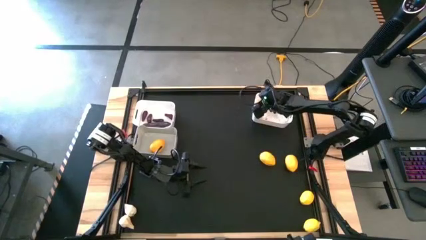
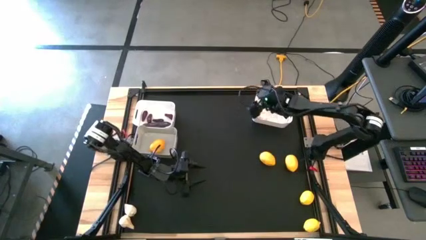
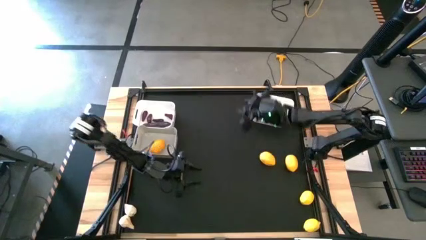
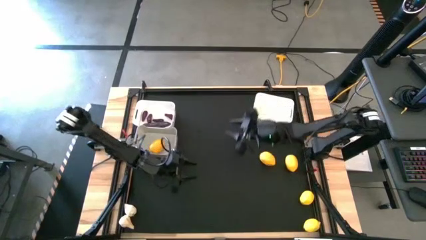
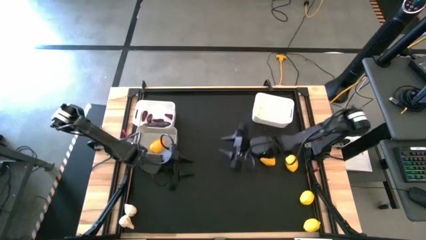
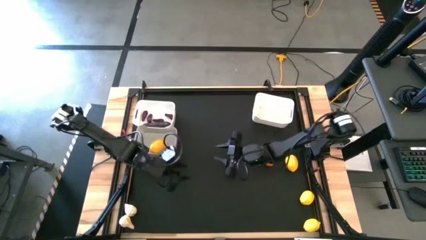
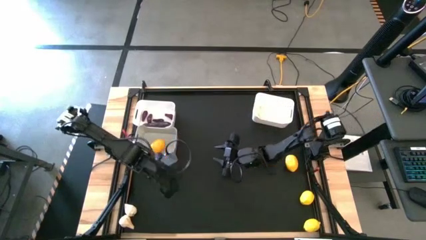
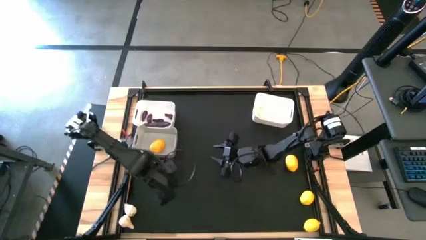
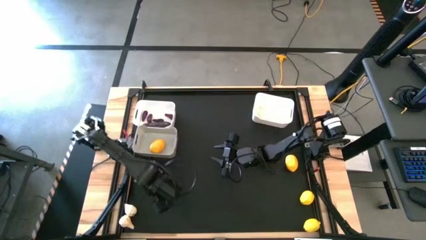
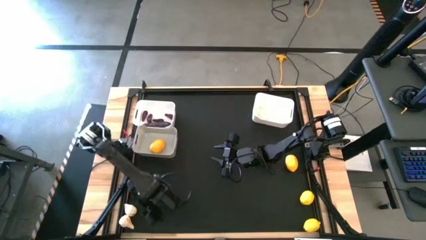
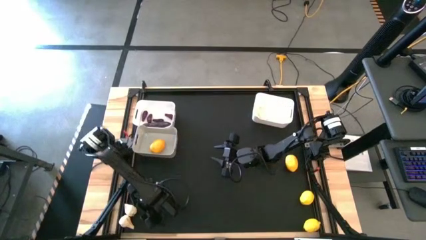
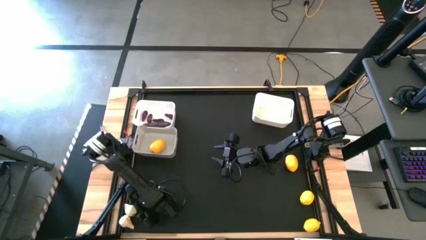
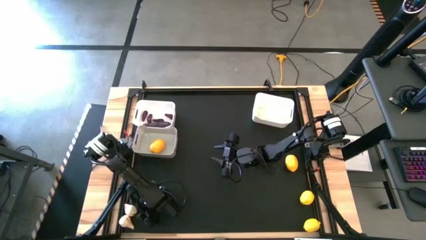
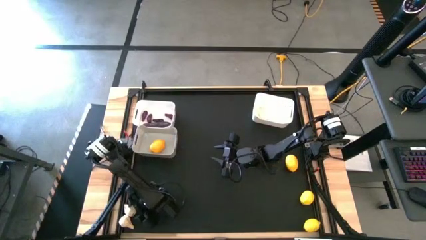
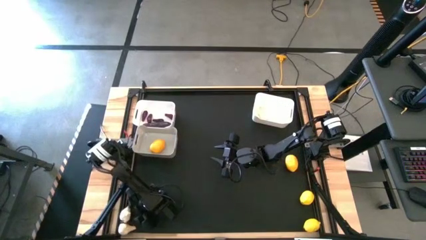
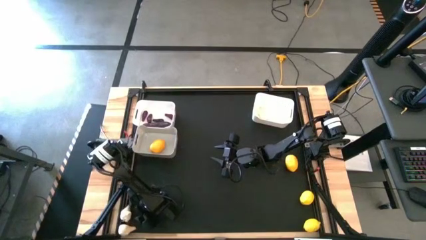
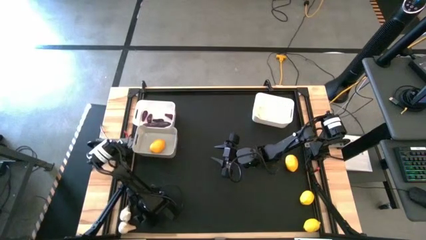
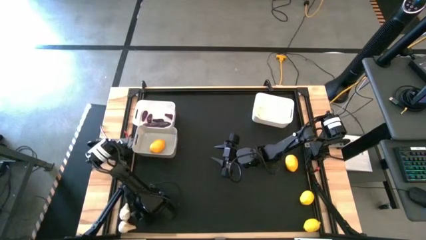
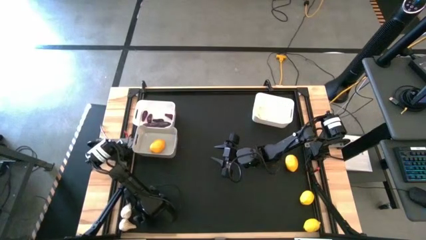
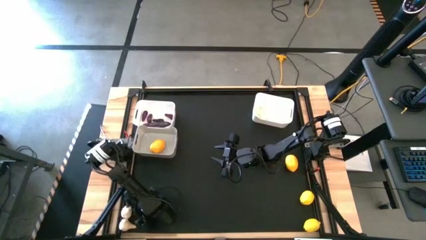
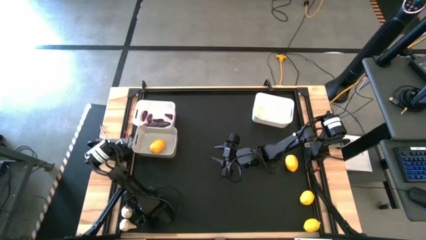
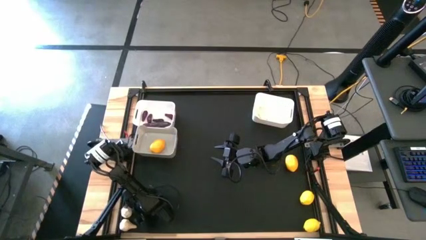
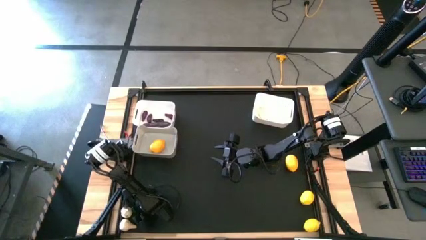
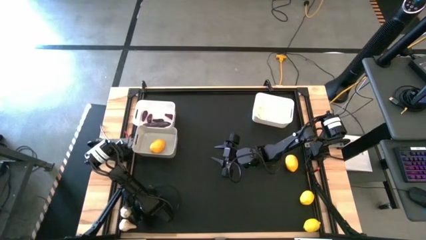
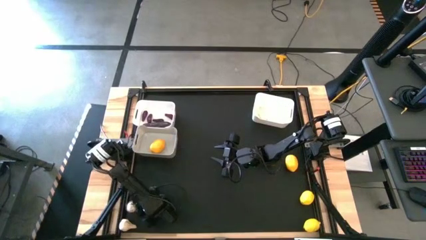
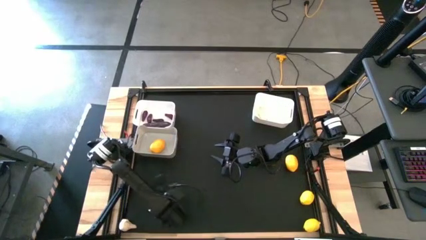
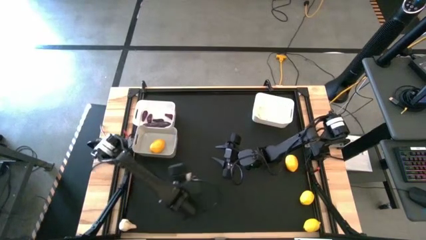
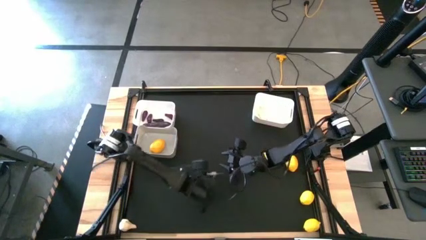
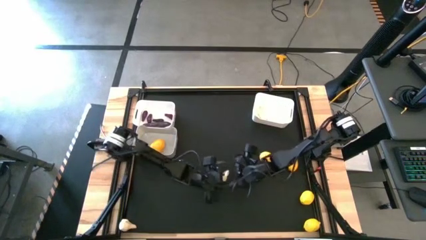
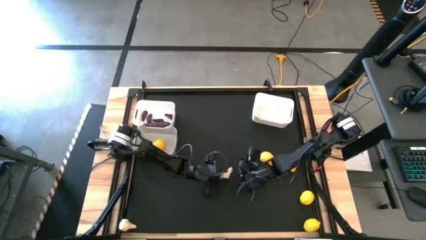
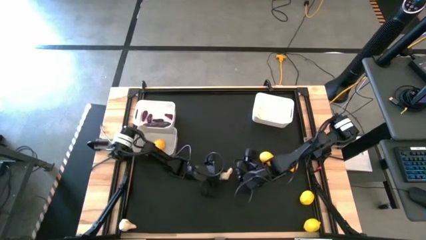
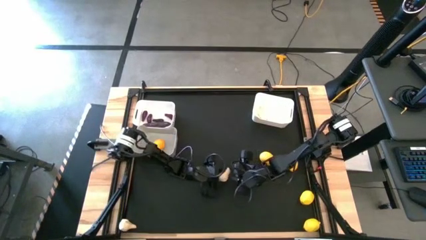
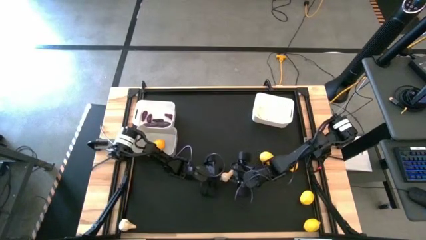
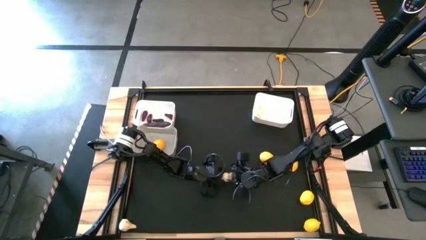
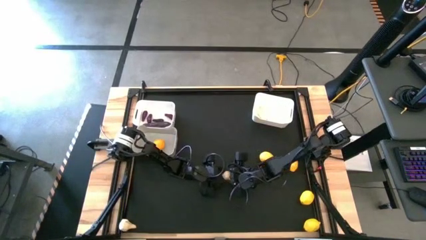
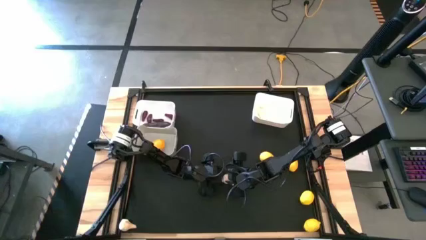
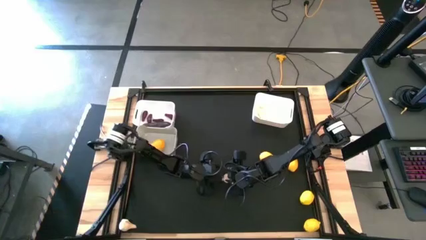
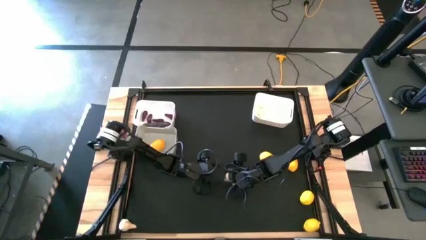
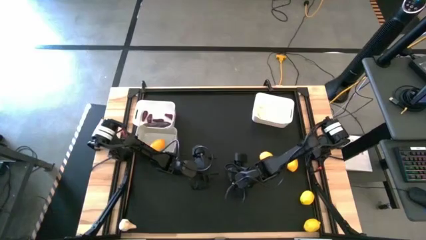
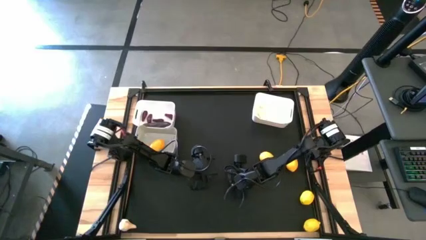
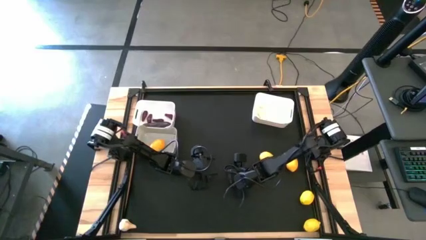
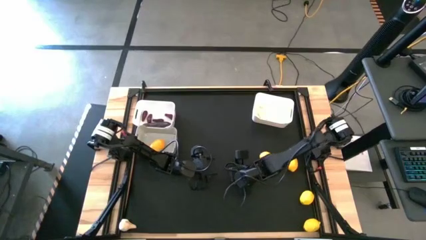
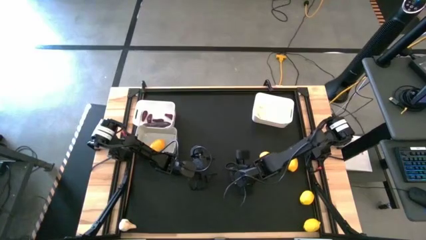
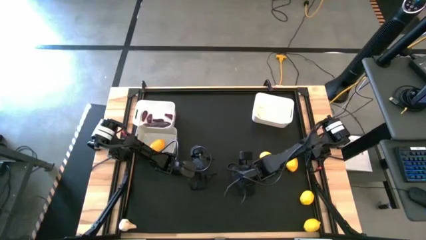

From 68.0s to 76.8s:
Task: Sort produce into baskets
Put the garlic into the right white bin

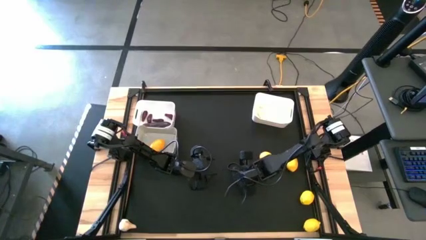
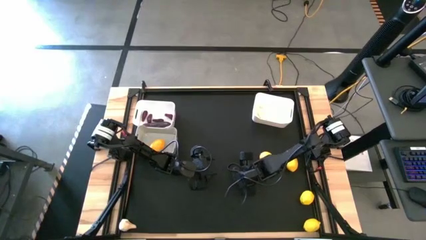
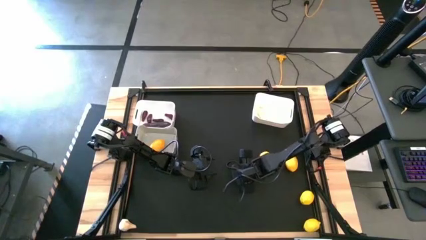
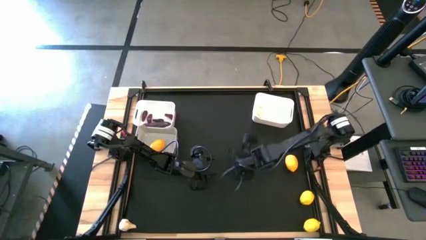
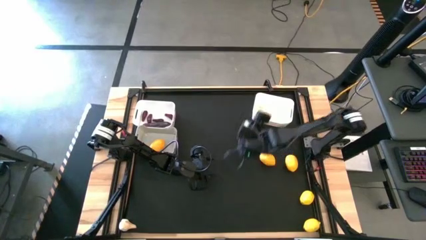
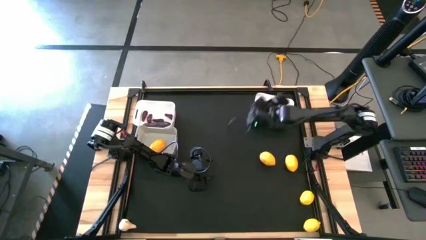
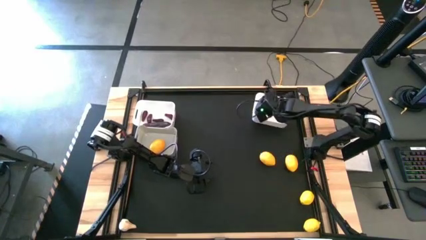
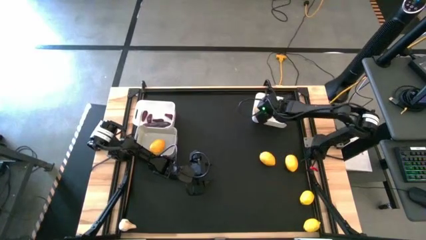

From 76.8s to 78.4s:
Put the garlic into the right white bin

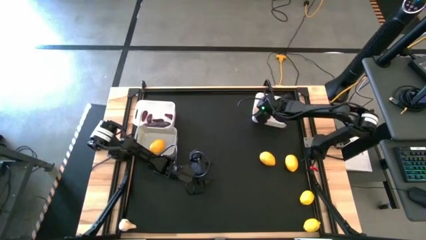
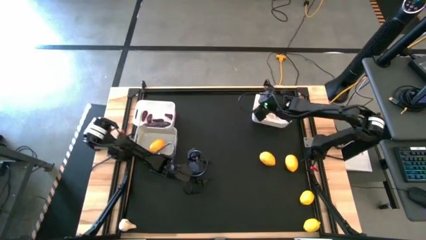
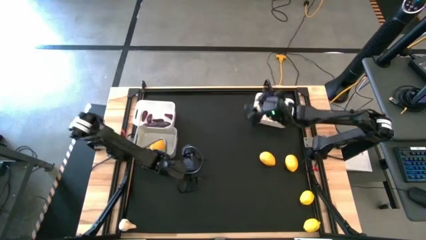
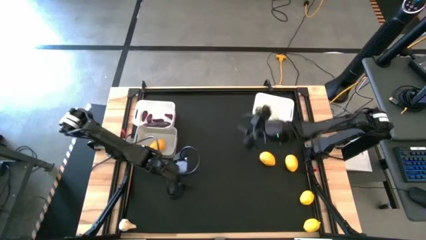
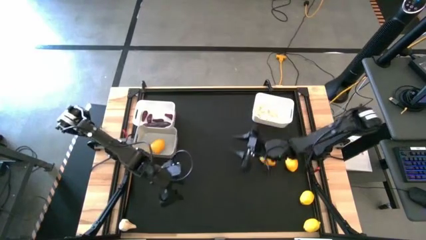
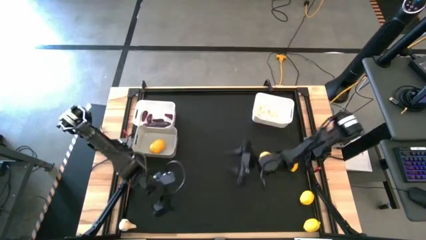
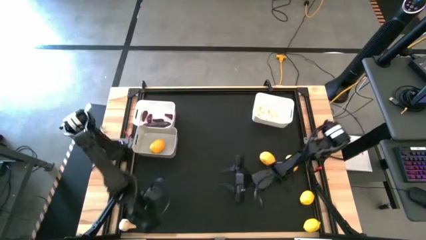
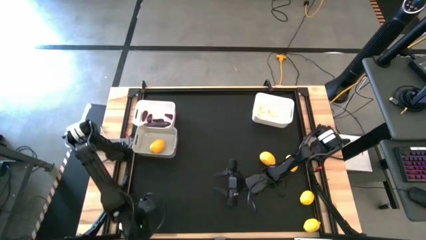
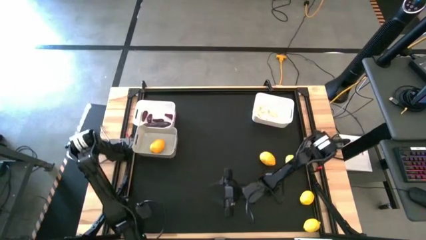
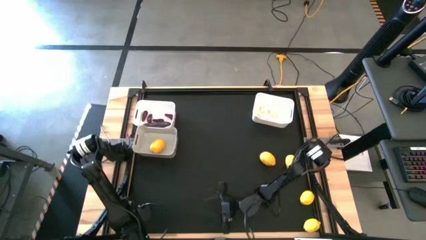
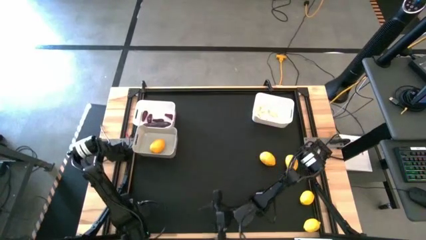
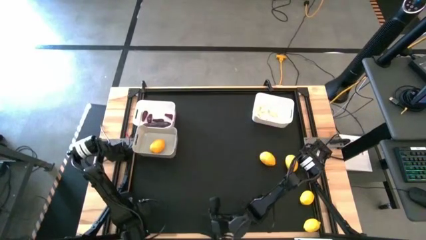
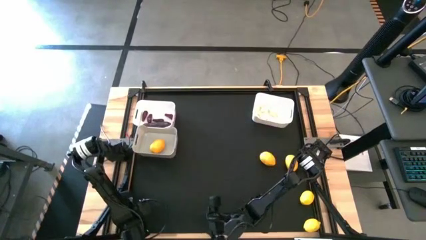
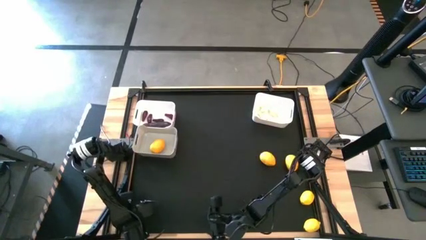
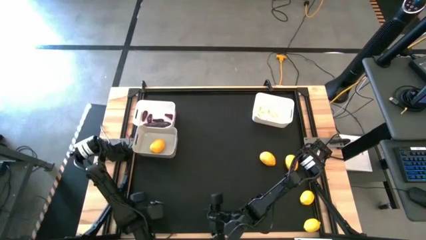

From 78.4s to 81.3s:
Put the garlic into the right white bin

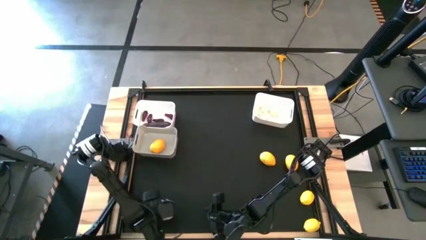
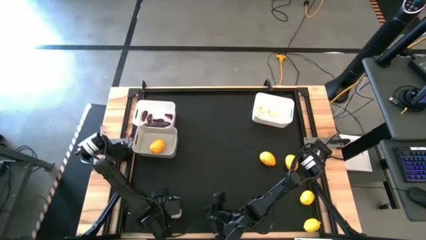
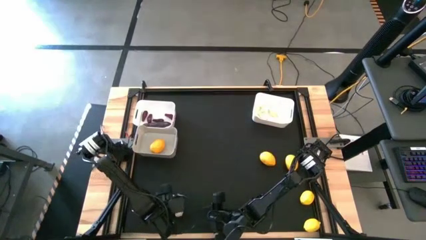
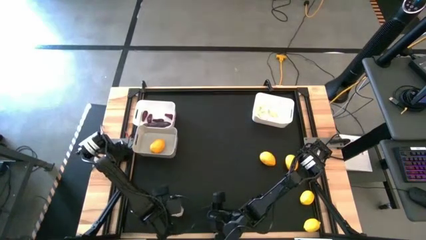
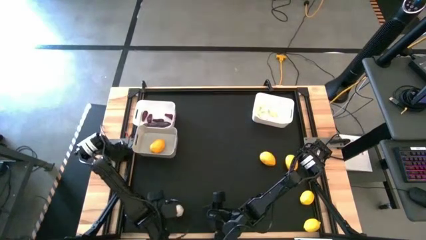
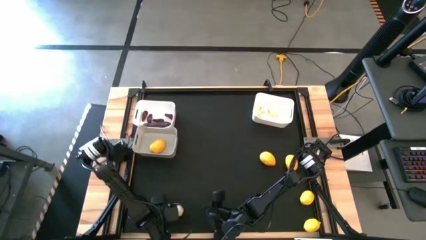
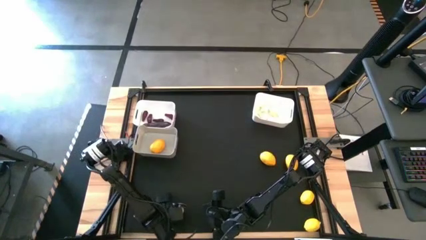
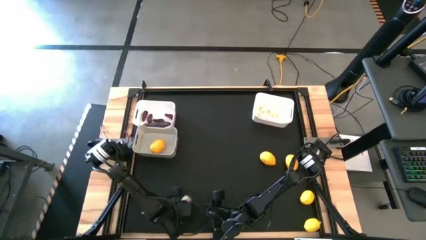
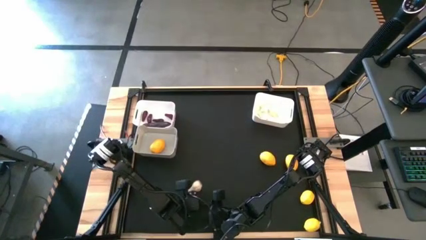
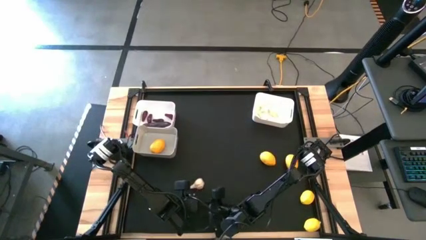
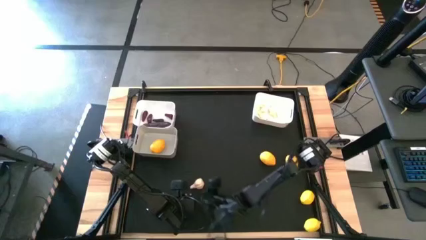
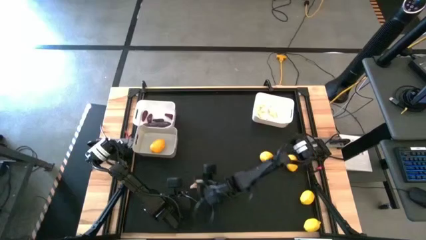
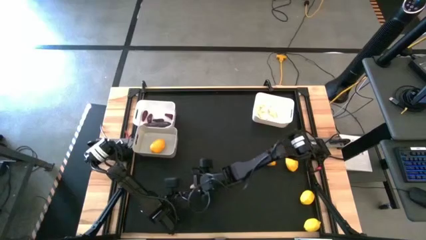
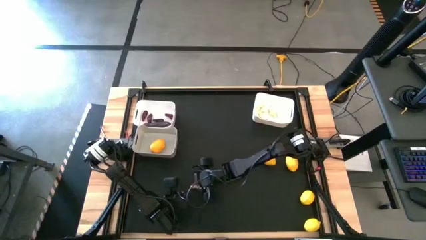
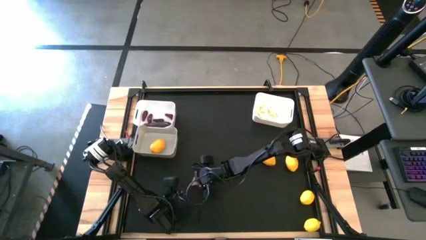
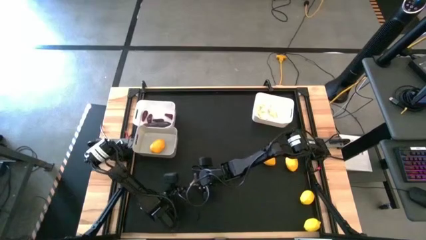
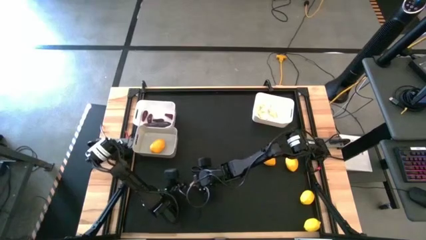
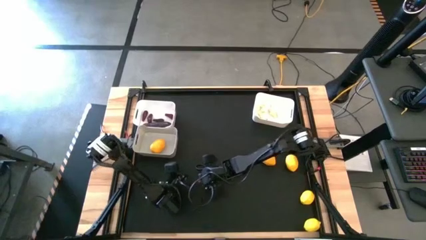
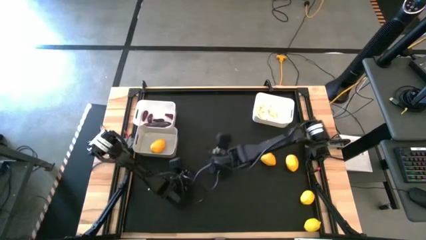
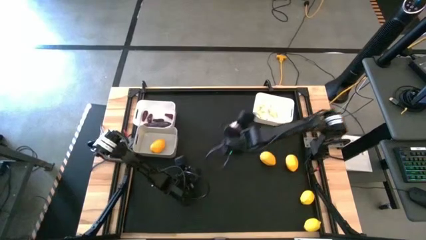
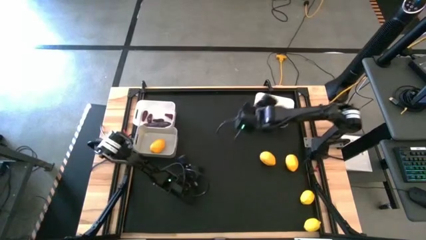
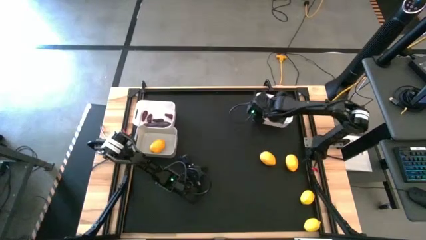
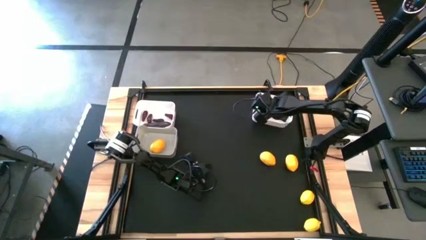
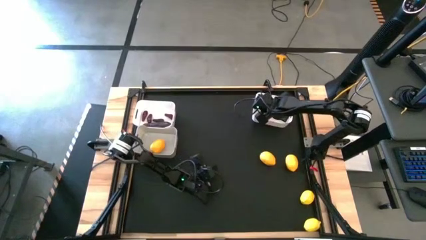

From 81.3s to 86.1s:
Put the garlic into the right white bin
